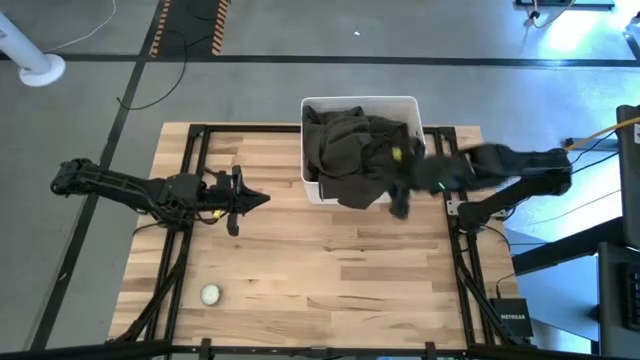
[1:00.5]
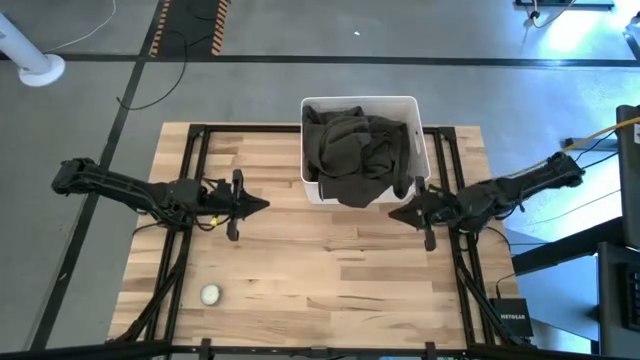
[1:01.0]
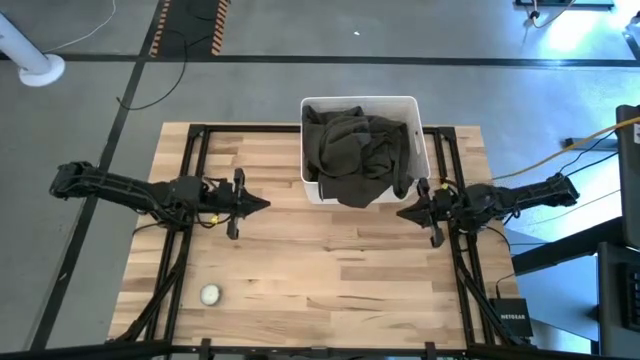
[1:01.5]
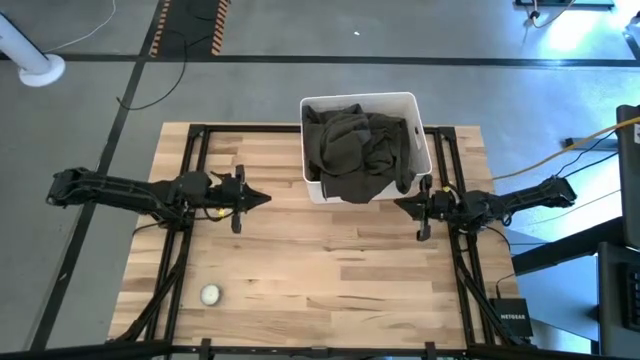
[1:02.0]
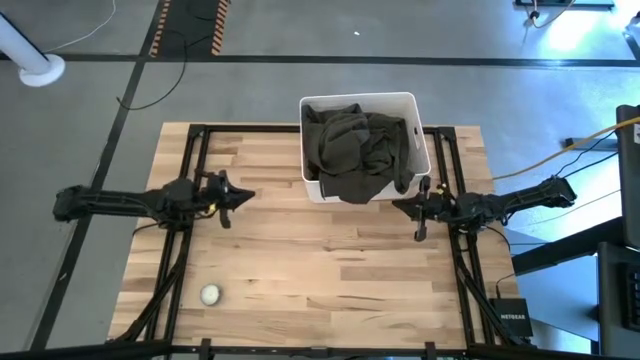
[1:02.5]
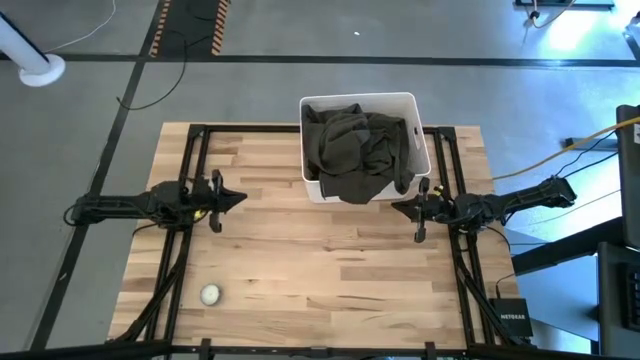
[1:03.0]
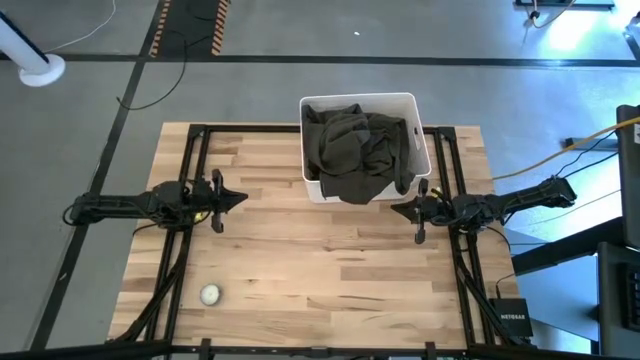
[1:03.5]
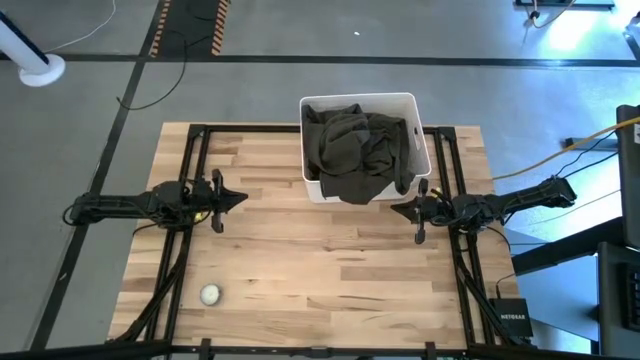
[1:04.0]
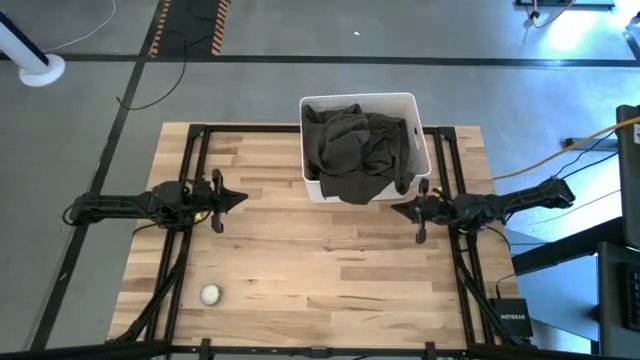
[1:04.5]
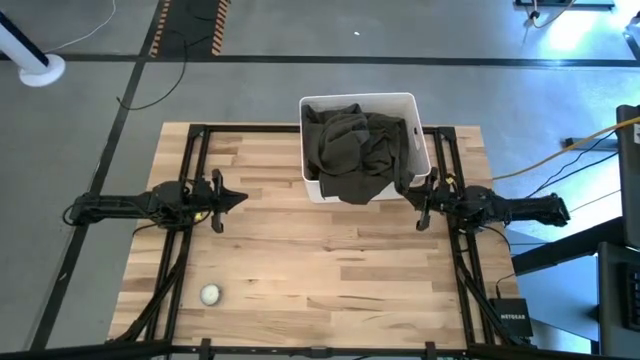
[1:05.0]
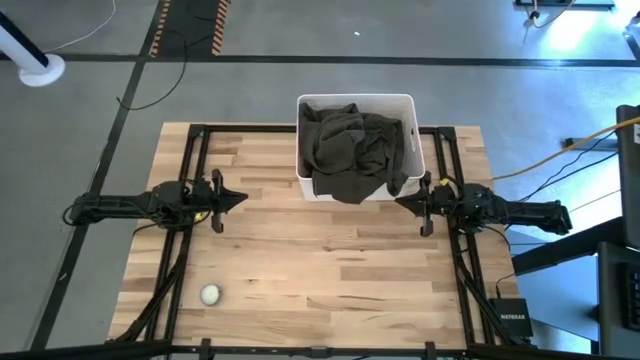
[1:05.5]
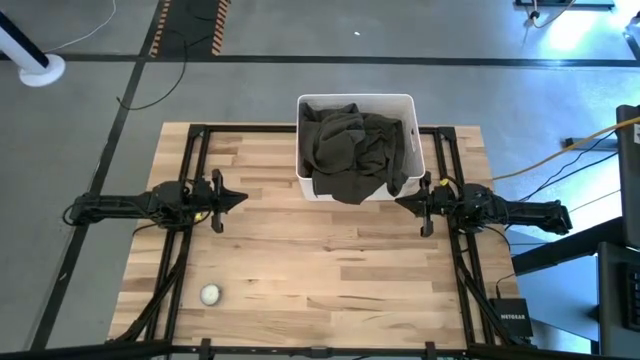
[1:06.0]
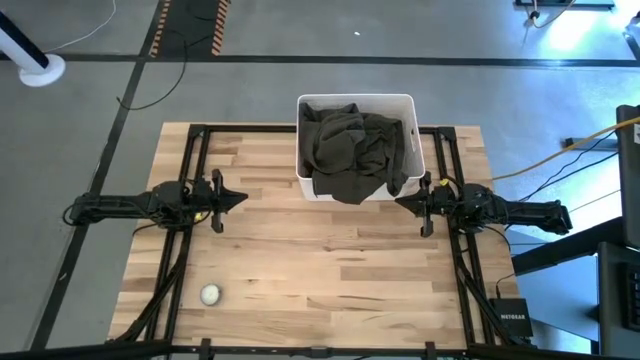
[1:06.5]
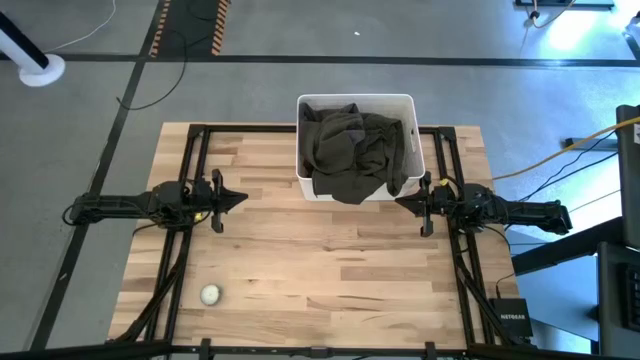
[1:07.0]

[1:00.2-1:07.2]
Task: Sort clothes
Return to Home Position

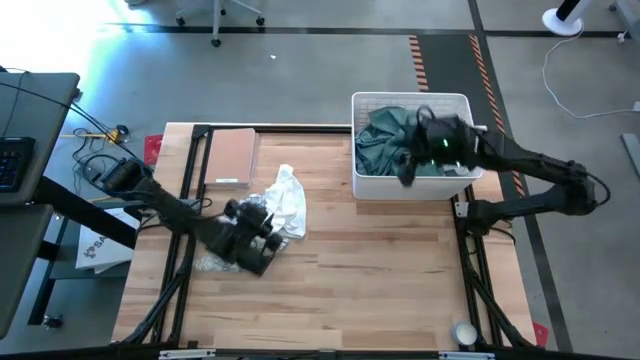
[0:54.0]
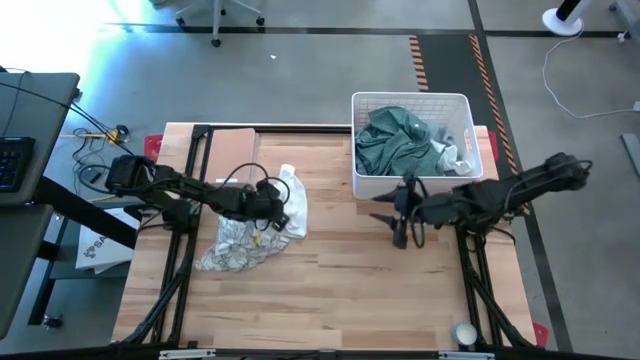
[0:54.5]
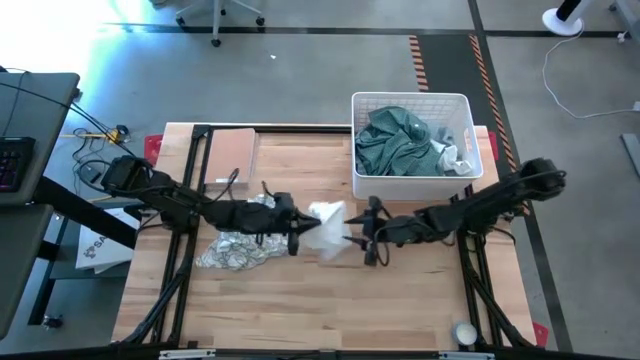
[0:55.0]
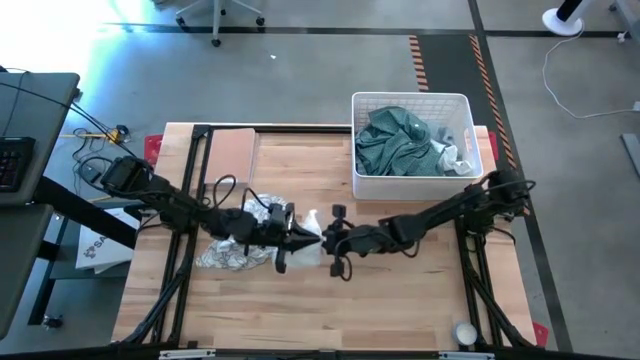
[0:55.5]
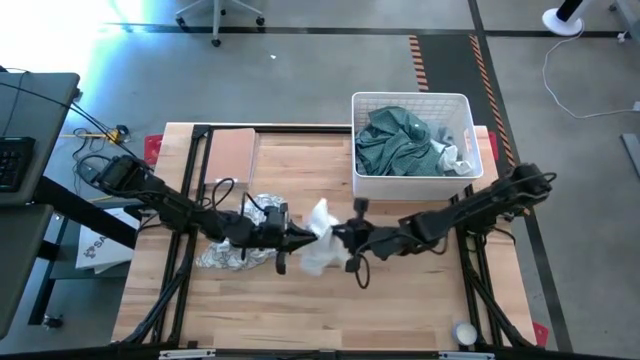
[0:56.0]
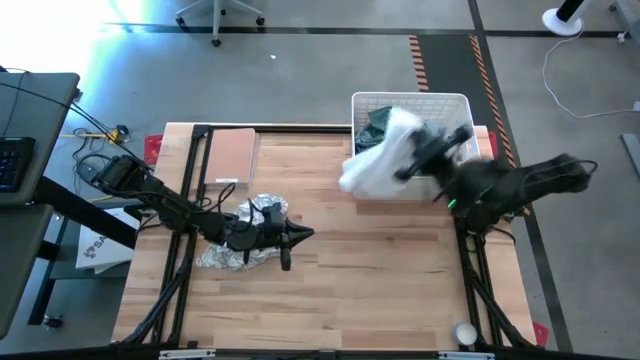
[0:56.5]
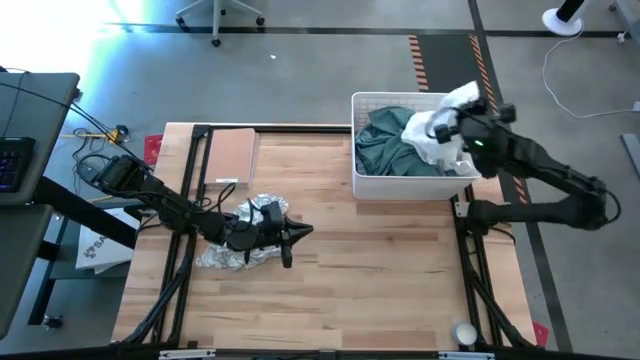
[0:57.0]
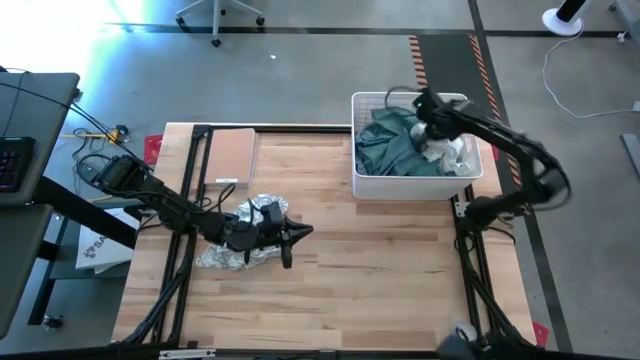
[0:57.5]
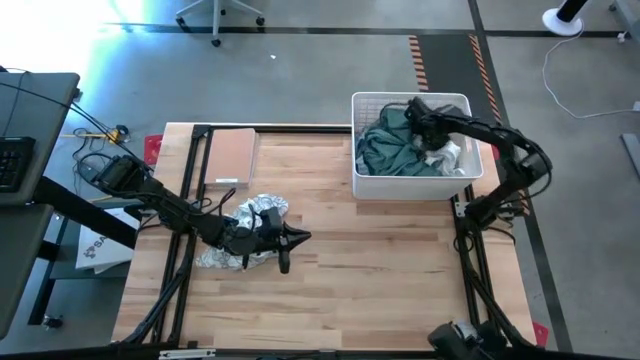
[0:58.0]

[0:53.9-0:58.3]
Task: Sort clothes
Put the white short into the white laundry bin

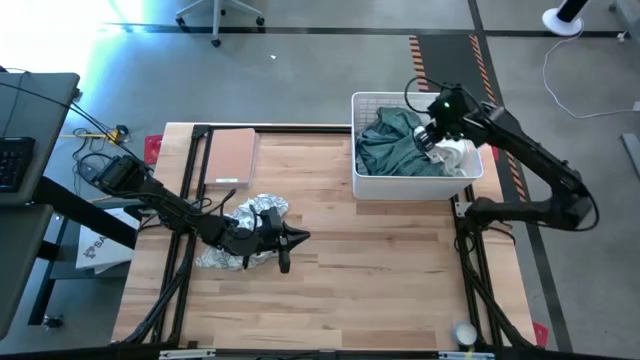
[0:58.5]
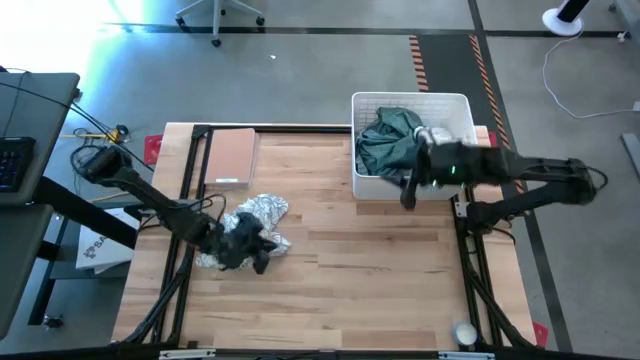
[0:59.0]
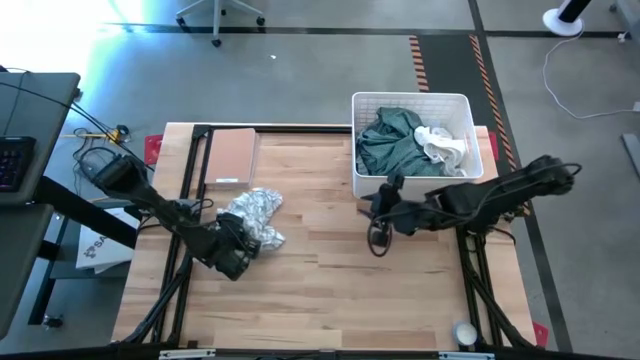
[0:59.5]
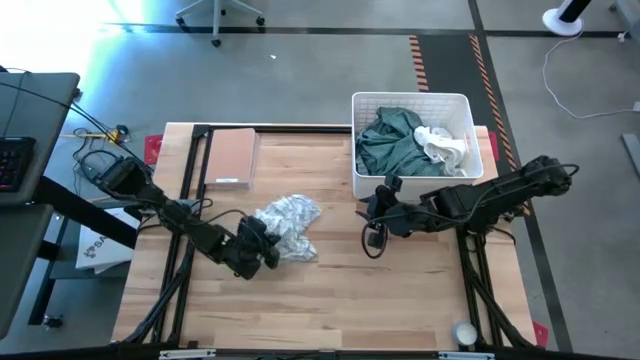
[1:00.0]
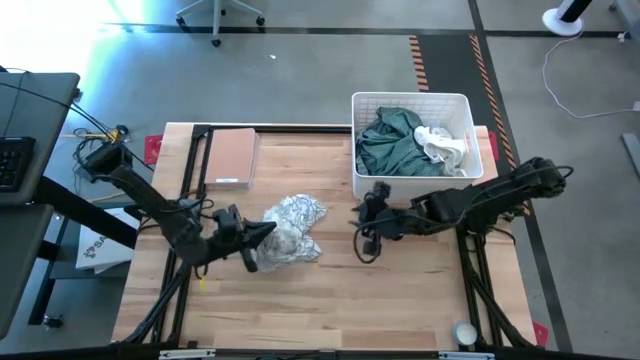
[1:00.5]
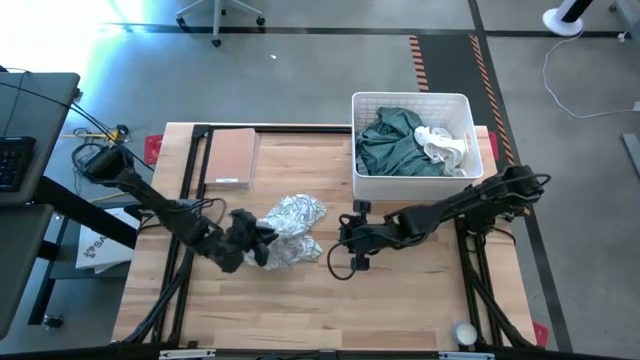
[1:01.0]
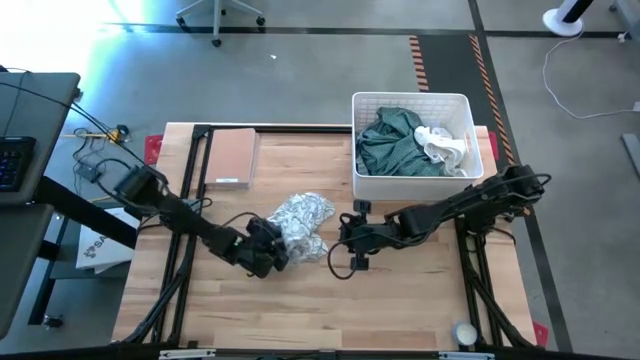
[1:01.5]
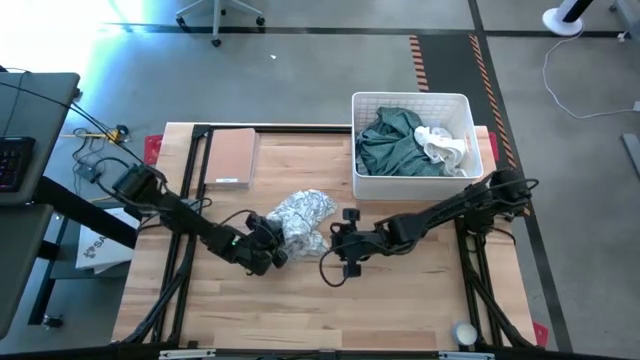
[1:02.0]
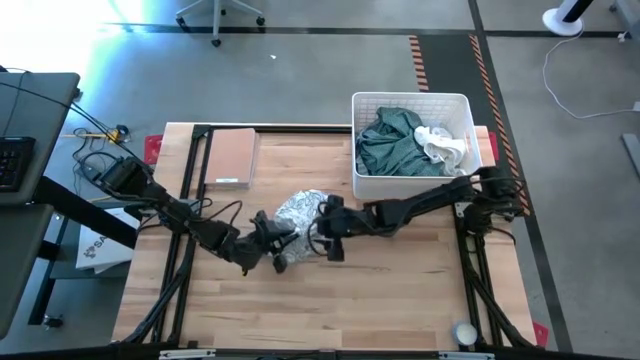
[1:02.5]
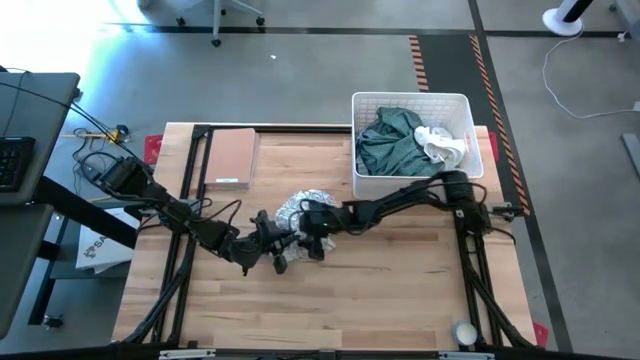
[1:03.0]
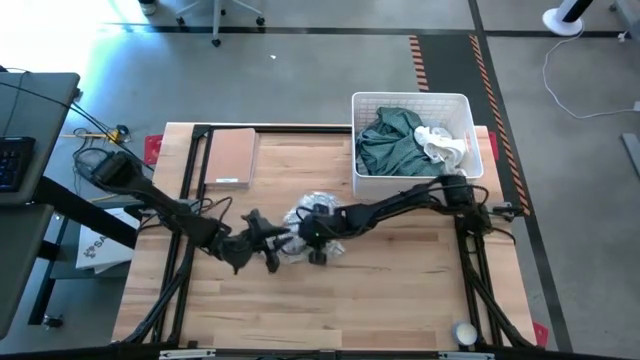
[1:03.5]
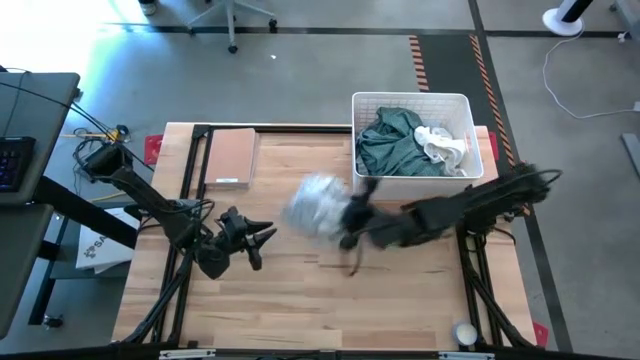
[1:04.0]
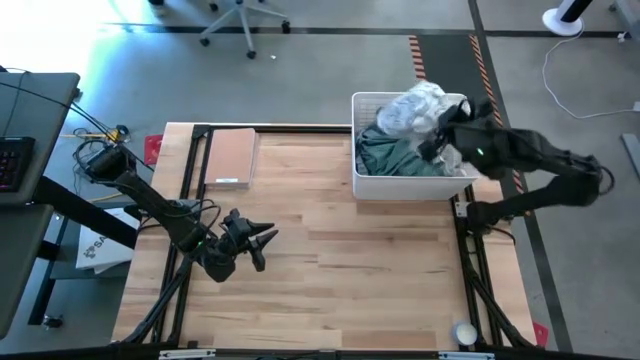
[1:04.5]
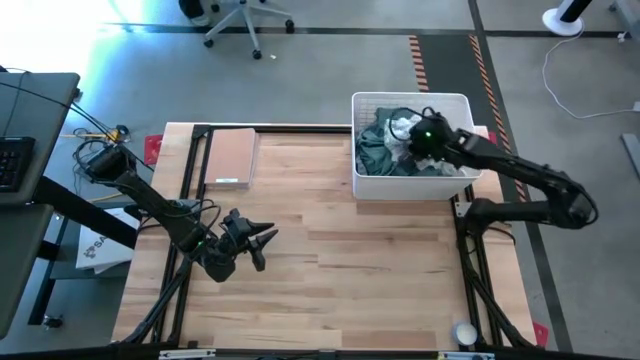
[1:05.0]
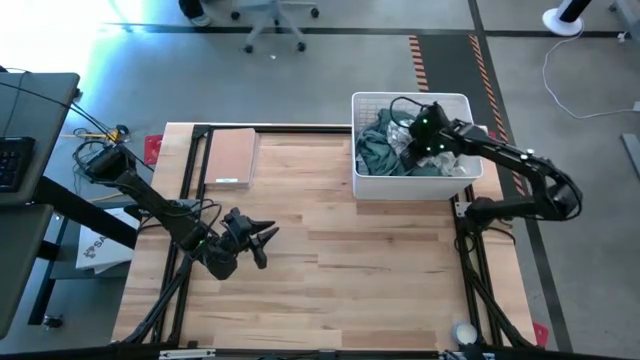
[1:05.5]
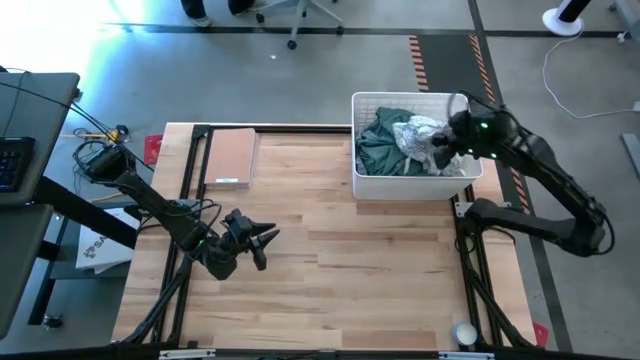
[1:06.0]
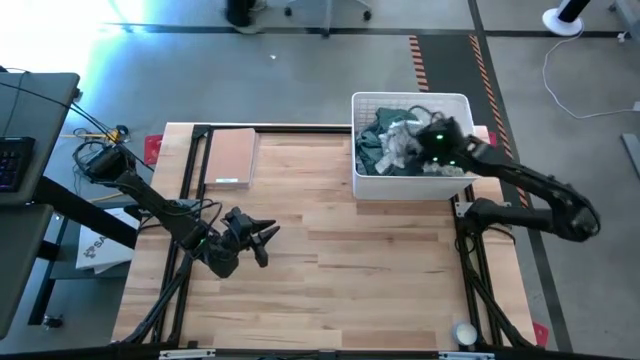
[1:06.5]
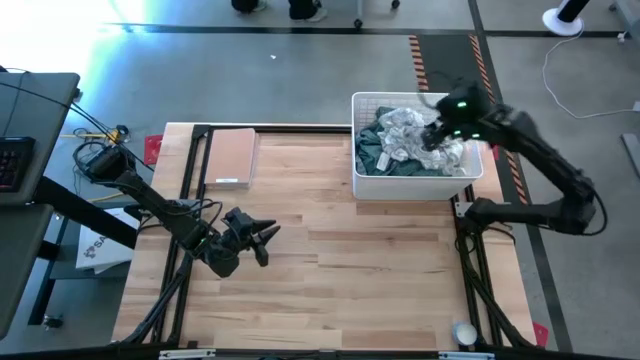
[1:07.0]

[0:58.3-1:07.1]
Put the white polo shirt into the white laundry bin

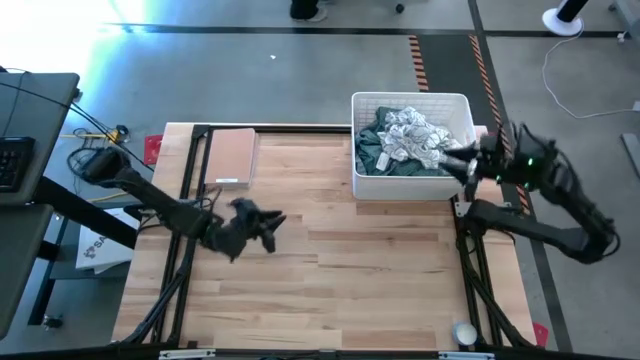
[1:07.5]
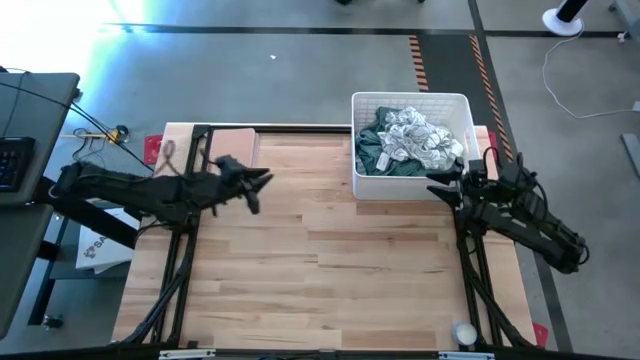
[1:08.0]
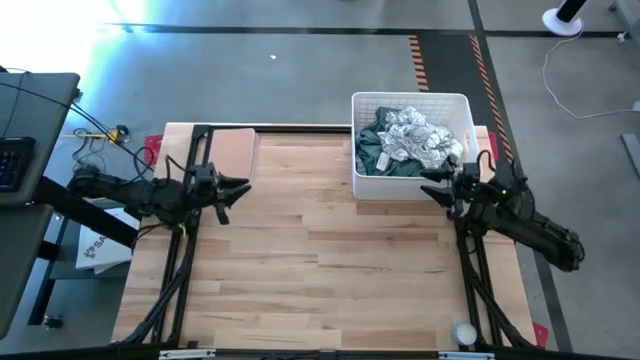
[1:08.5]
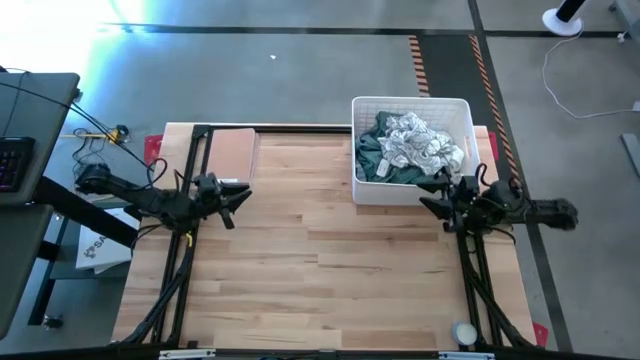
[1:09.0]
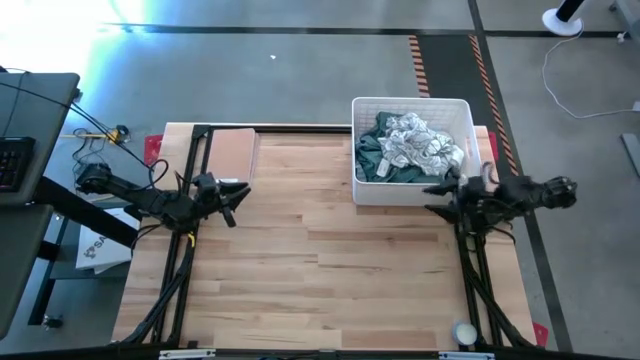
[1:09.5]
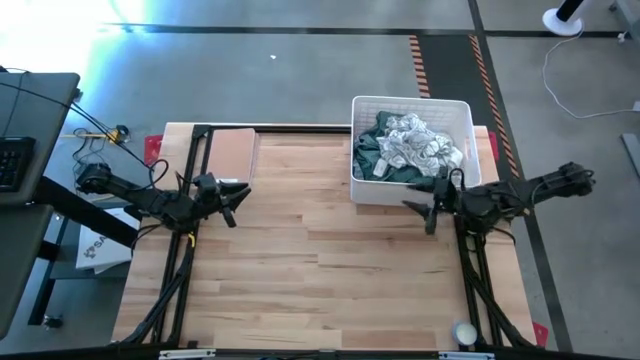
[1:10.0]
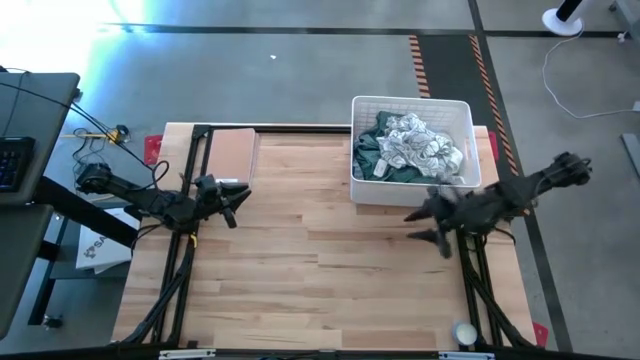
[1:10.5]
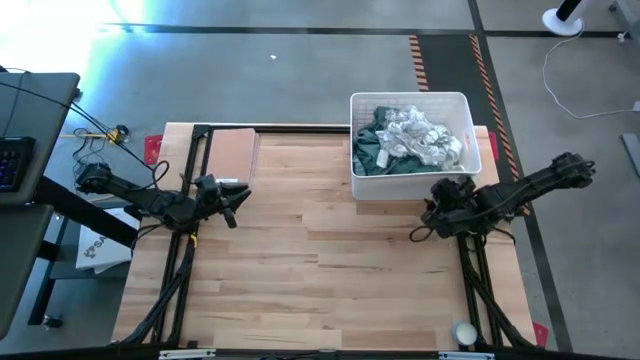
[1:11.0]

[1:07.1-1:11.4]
Adjust the white laundry bin
